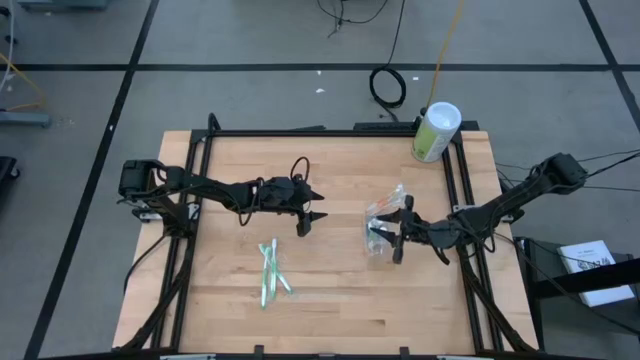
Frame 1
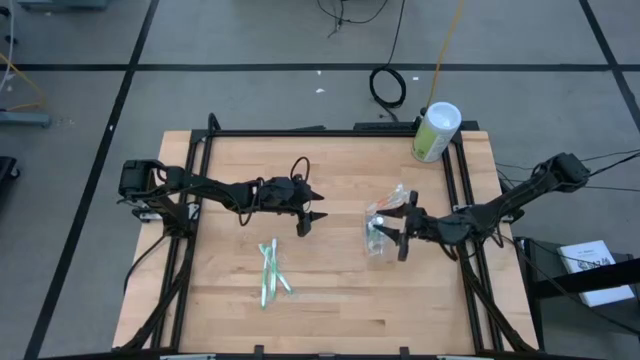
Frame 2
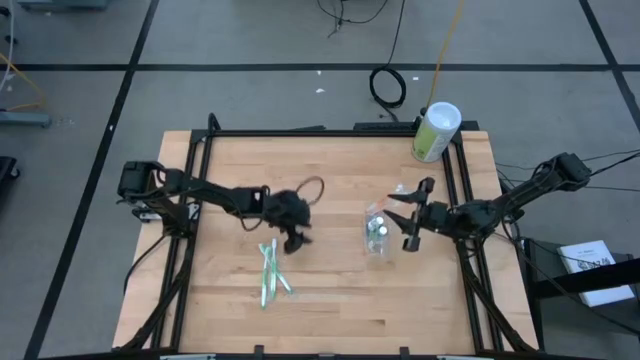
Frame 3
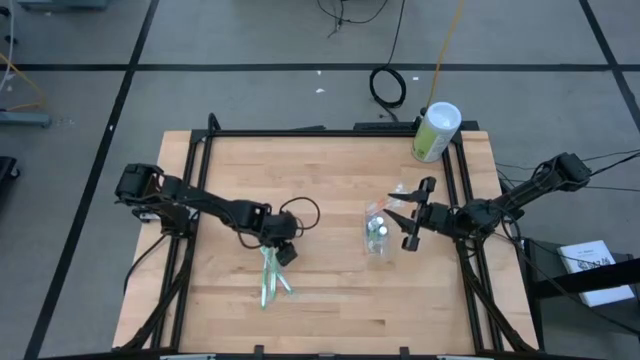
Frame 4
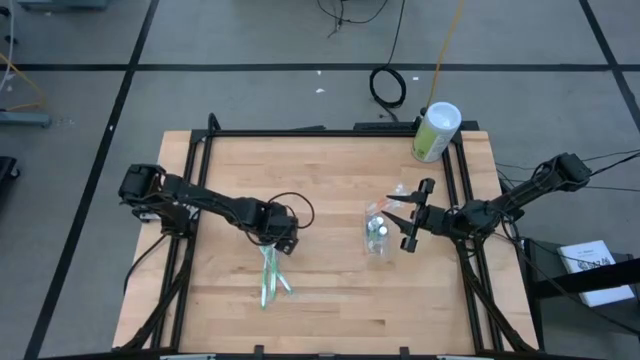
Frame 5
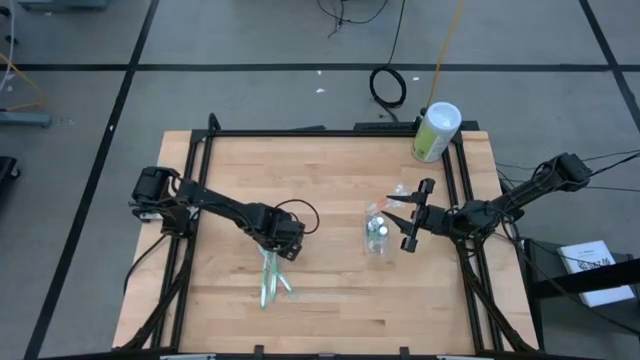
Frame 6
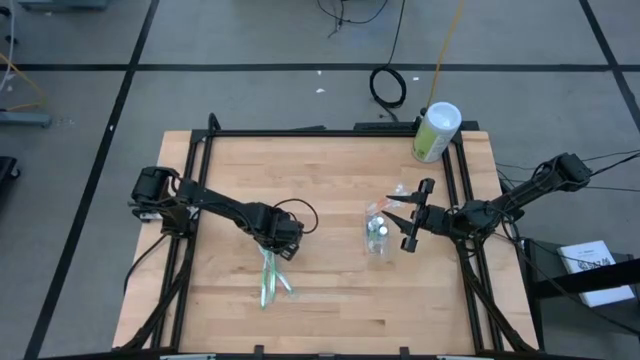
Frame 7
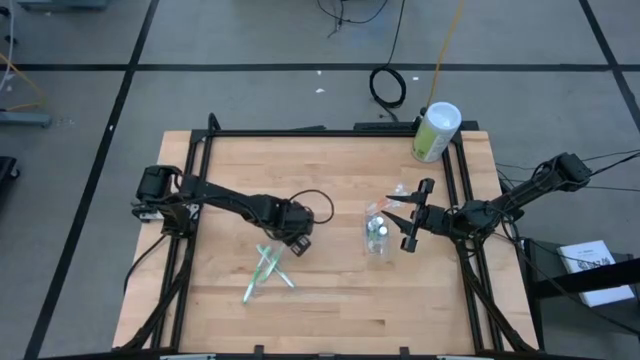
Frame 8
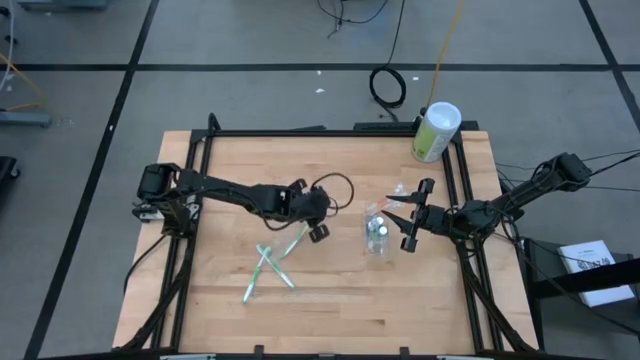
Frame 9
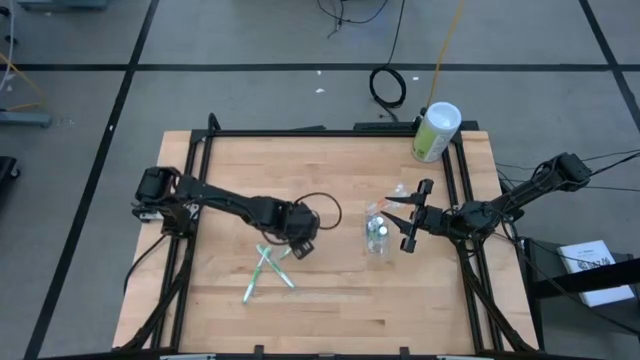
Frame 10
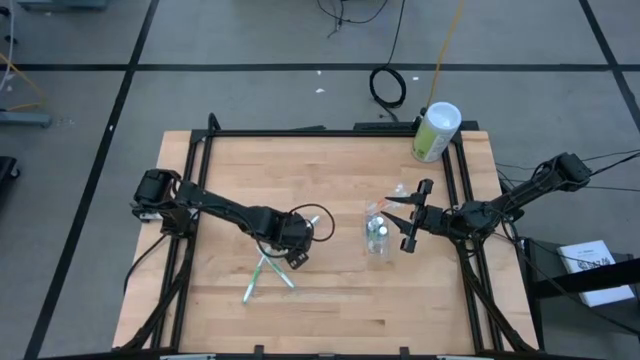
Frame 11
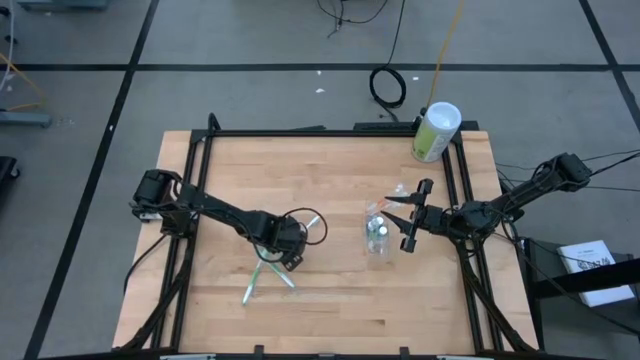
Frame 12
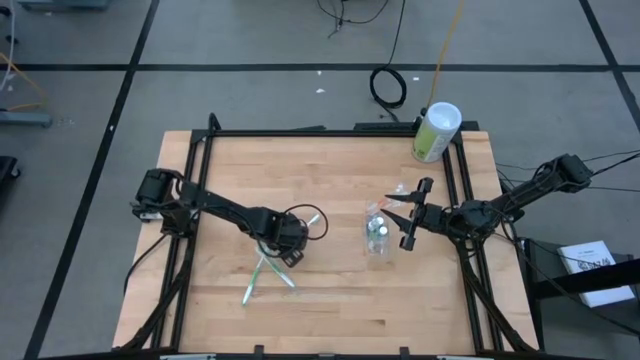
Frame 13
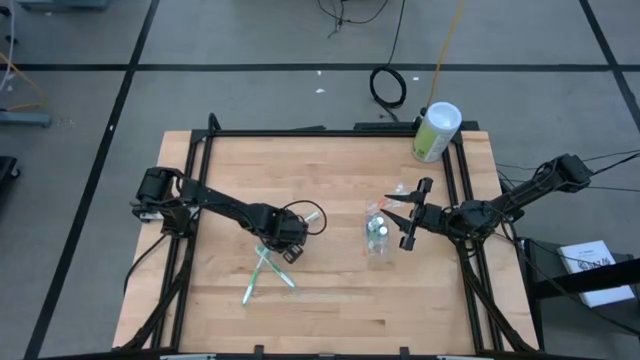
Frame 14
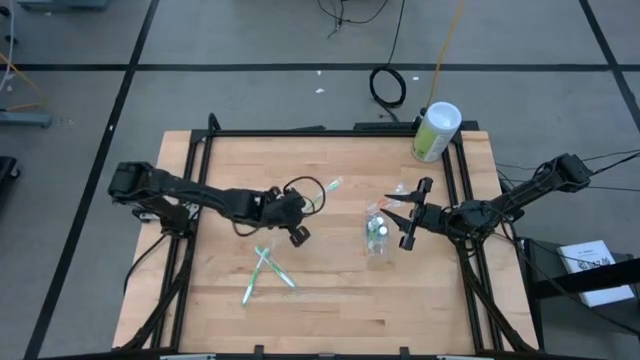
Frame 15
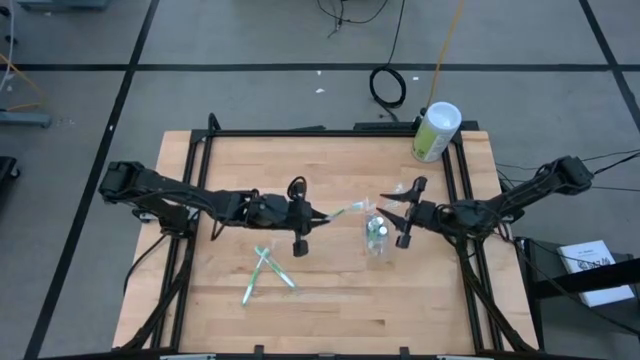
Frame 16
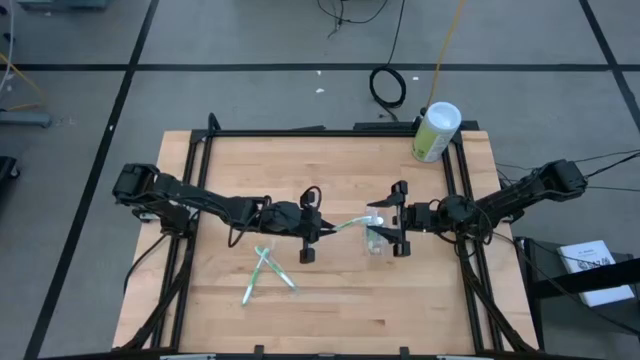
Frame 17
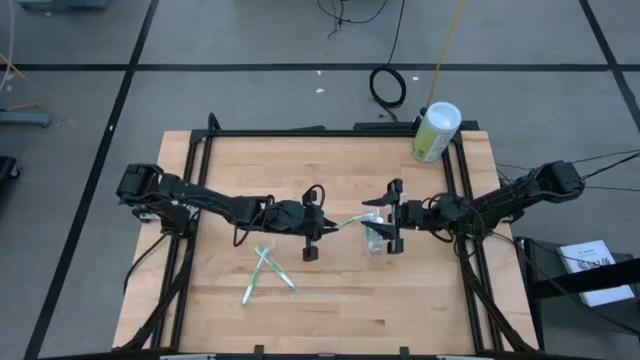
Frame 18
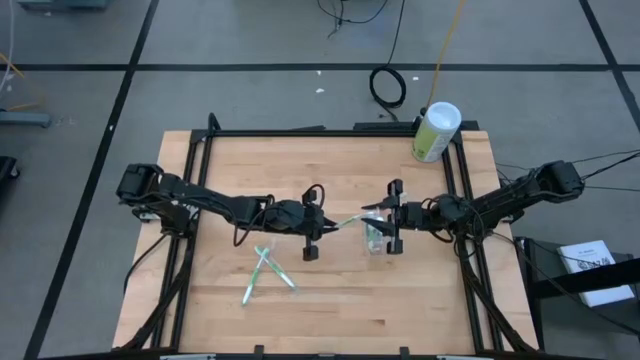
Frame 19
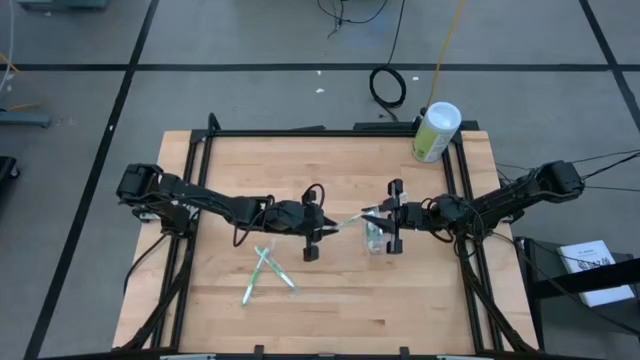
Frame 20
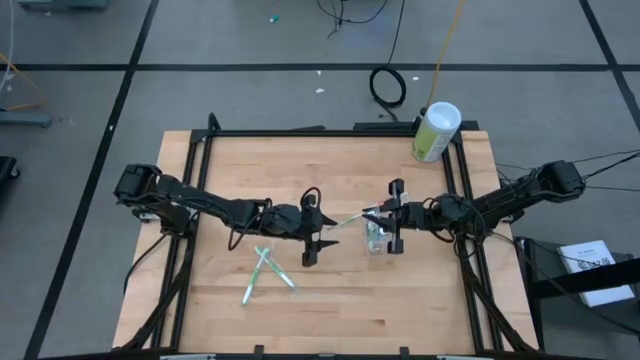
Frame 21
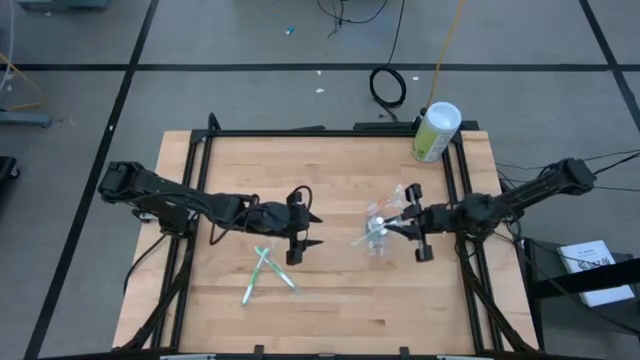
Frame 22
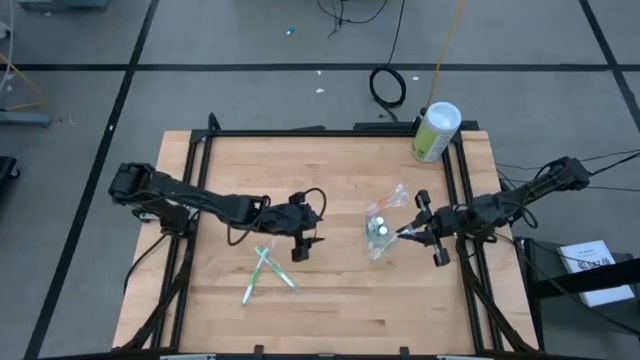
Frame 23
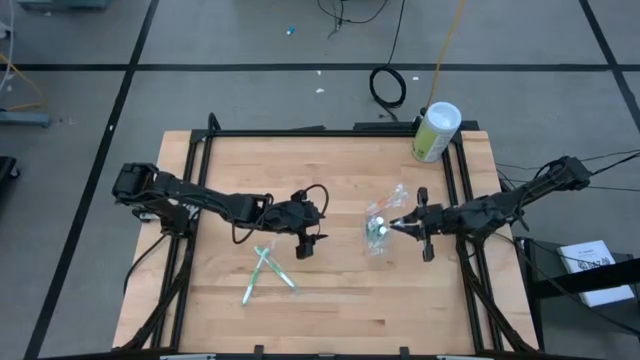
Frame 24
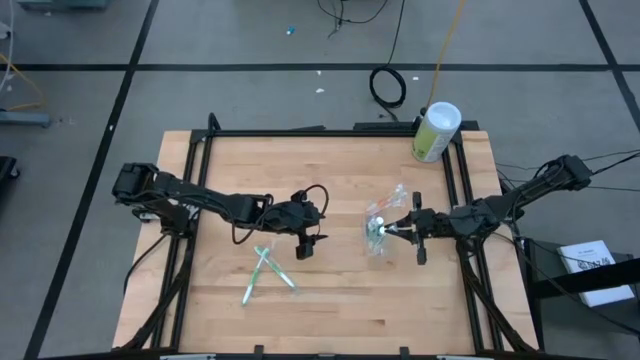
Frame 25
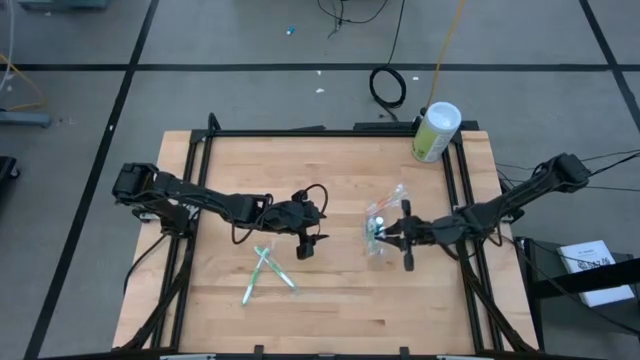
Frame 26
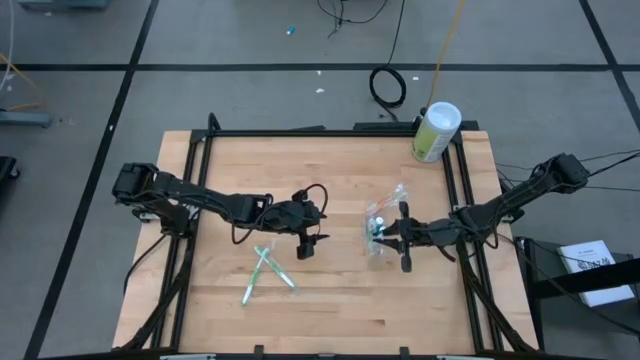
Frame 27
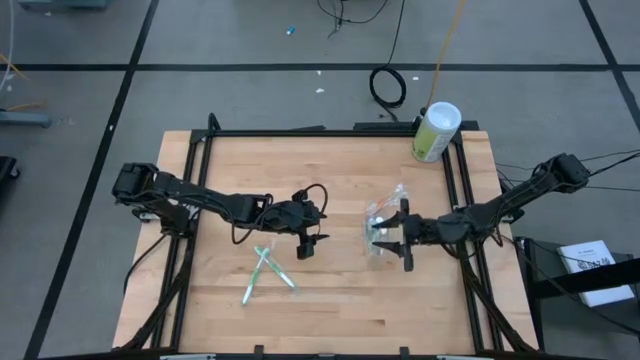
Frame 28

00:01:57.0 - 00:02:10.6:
Task: Pick & Place toothbrushing station
Put the green toothbrush into the bottom of the transparent organizer

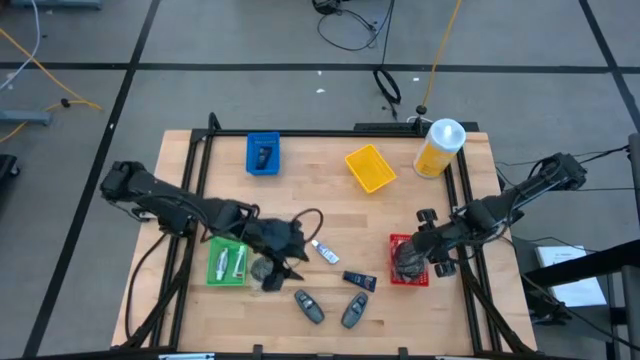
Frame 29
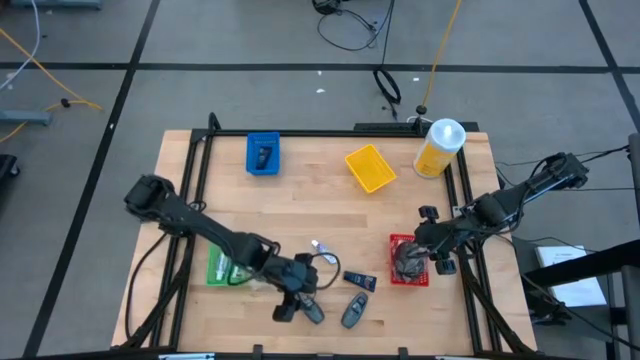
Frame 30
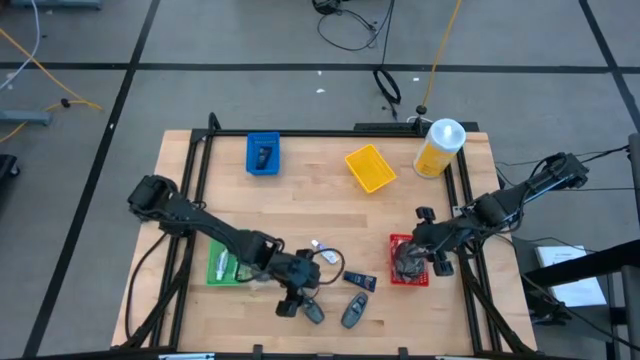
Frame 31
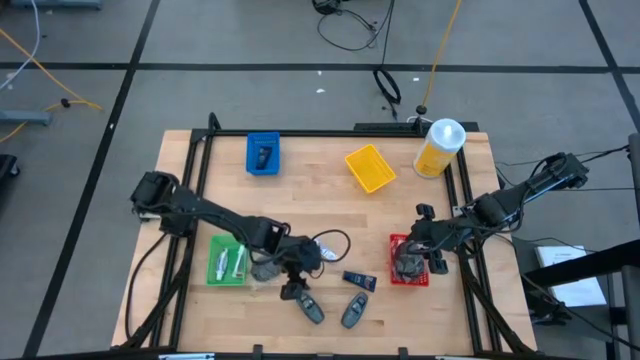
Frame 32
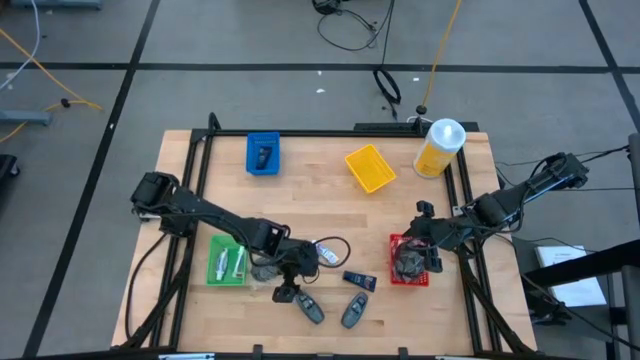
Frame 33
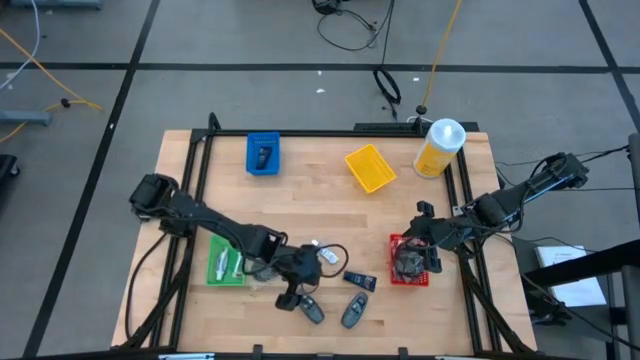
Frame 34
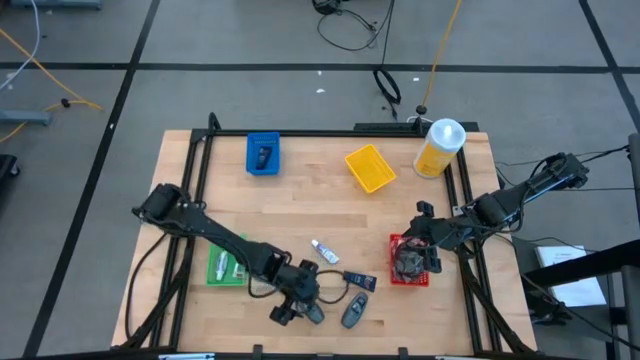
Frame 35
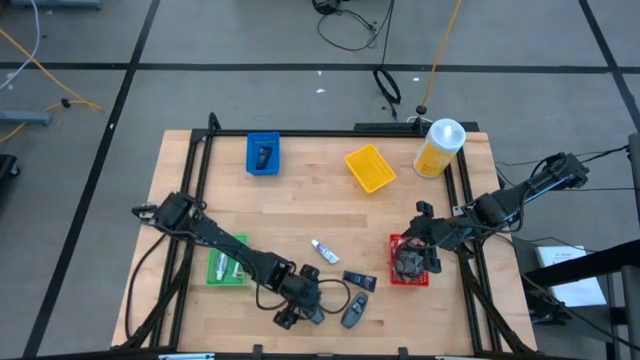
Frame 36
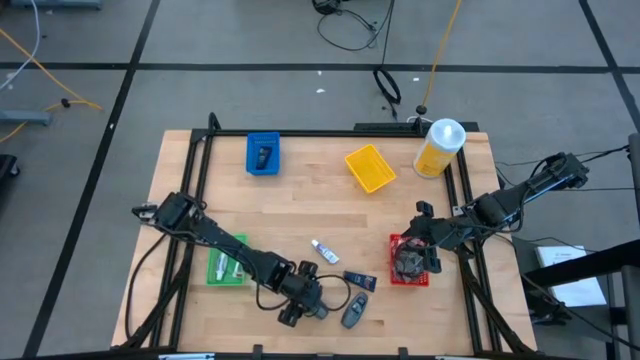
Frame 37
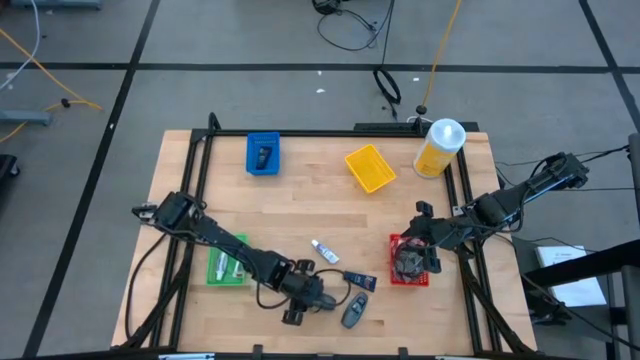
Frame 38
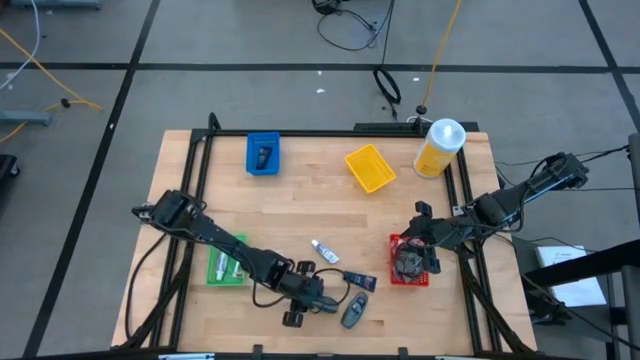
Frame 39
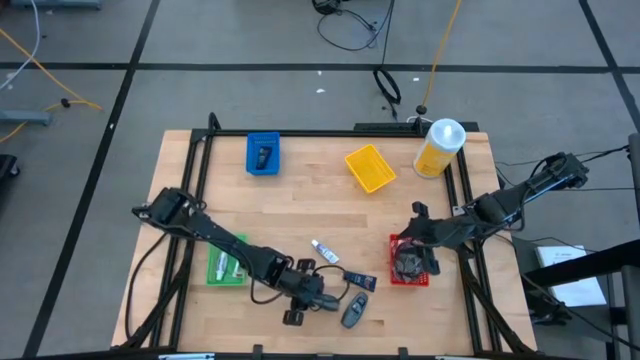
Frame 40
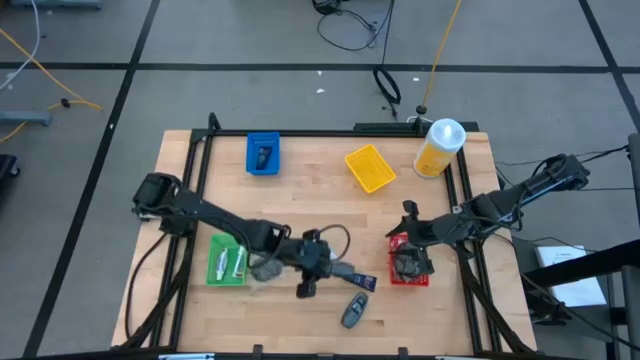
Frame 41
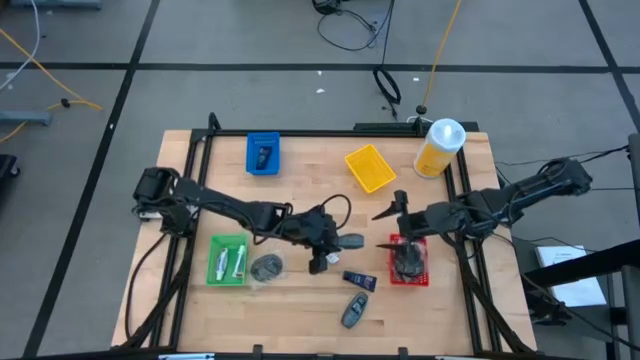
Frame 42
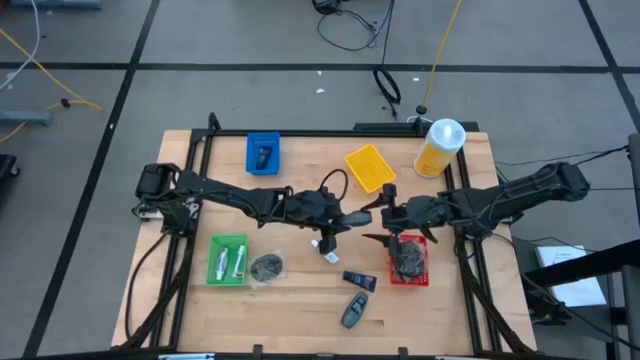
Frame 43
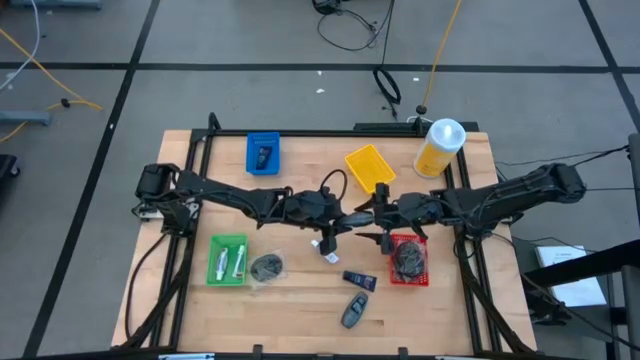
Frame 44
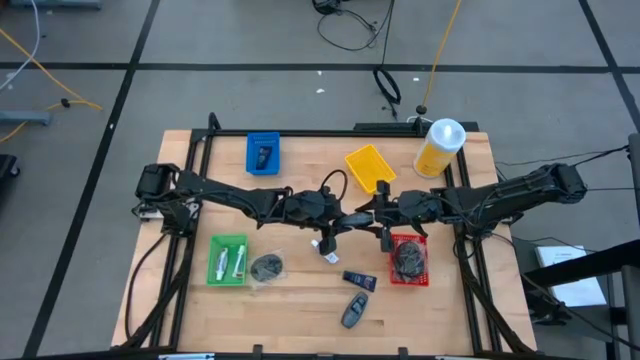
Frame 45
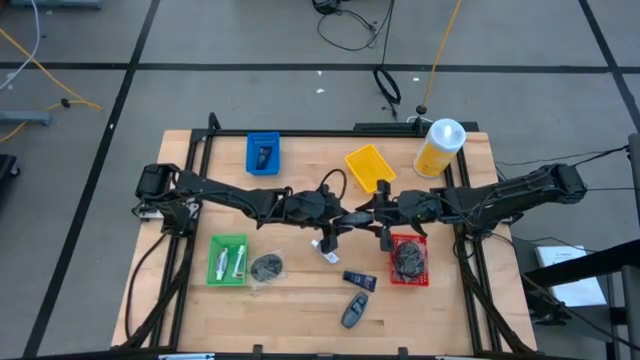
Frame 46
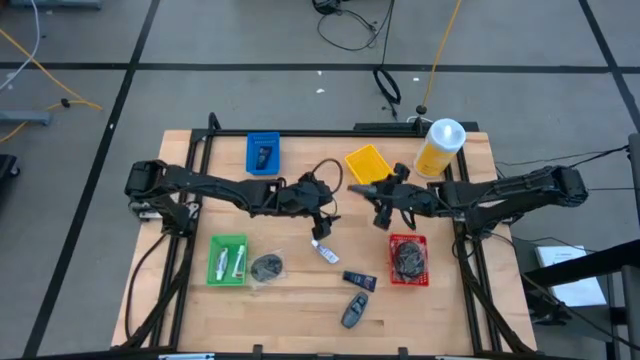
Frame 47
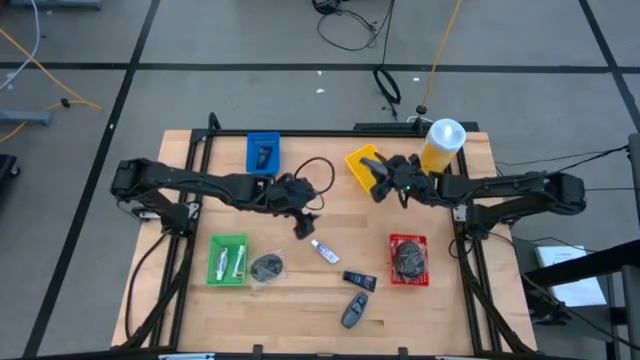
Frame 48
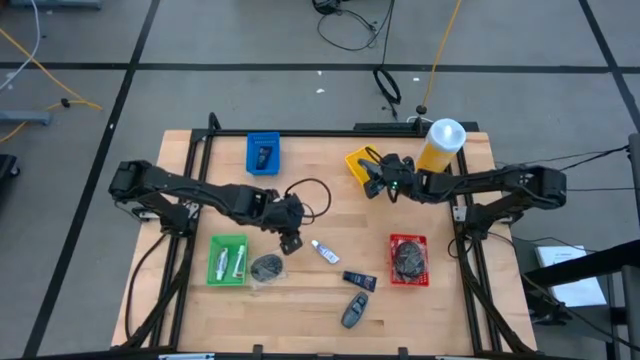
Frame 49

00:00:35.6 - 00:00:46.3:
Task: Pick & Place Travel size toiletries
Put the gray deodorant into the yellow bin
